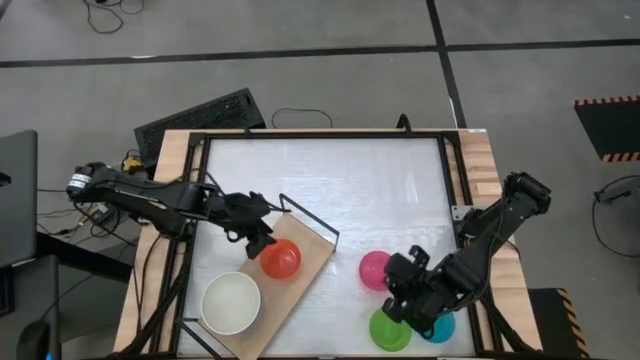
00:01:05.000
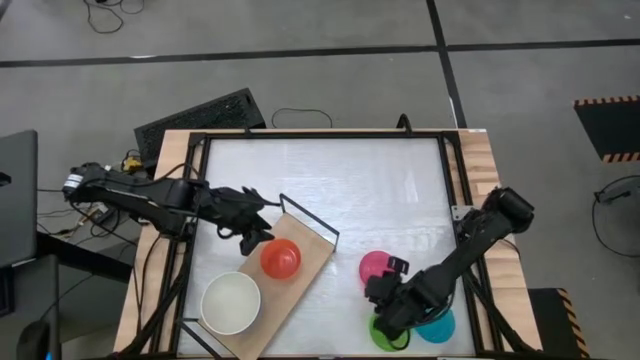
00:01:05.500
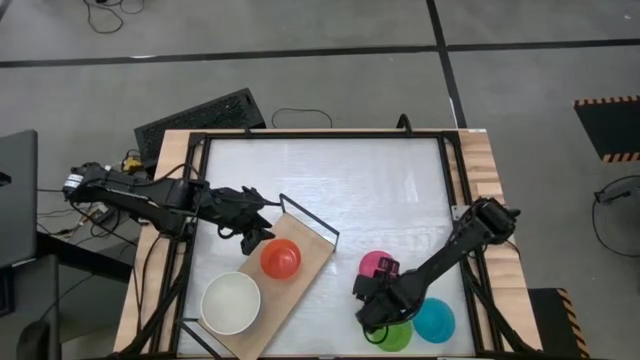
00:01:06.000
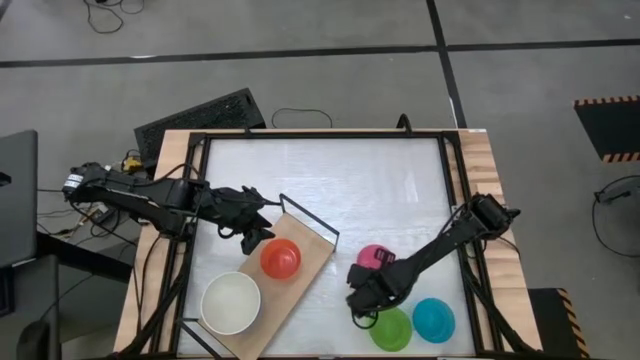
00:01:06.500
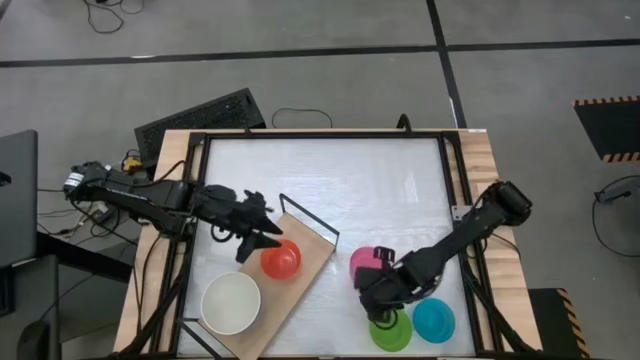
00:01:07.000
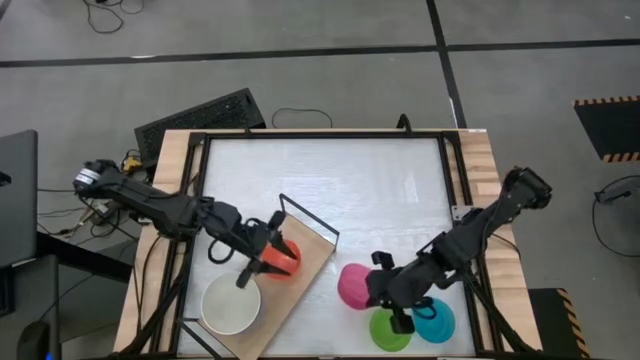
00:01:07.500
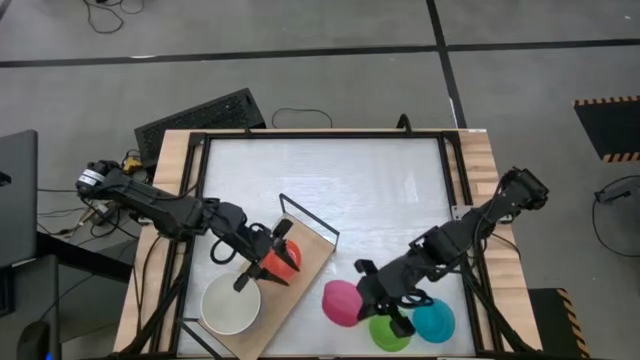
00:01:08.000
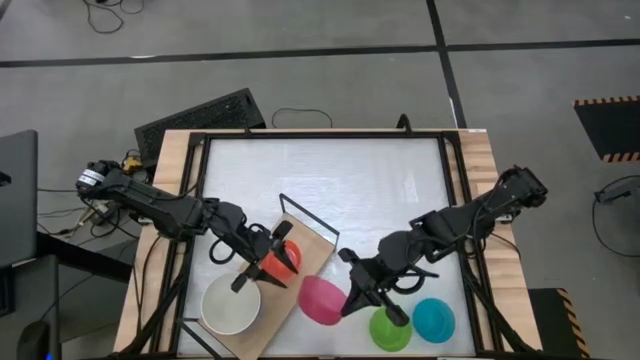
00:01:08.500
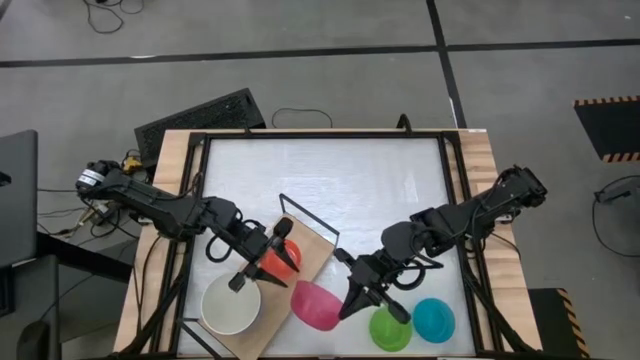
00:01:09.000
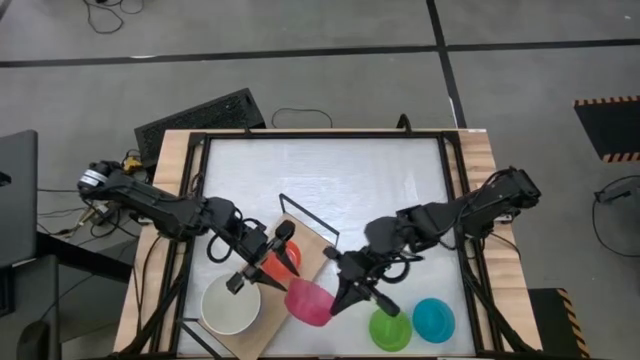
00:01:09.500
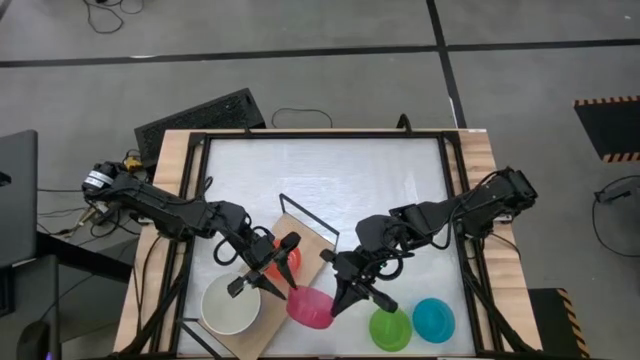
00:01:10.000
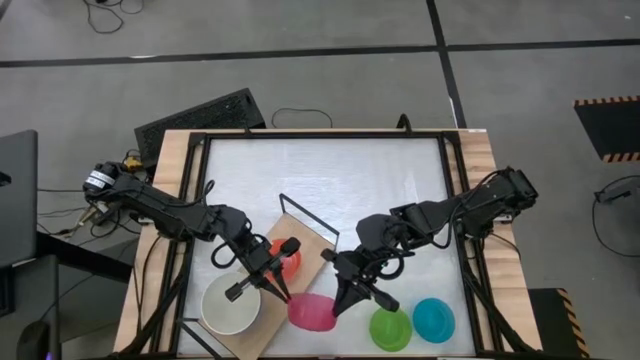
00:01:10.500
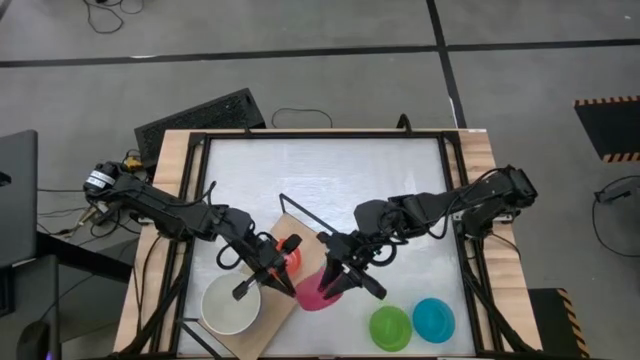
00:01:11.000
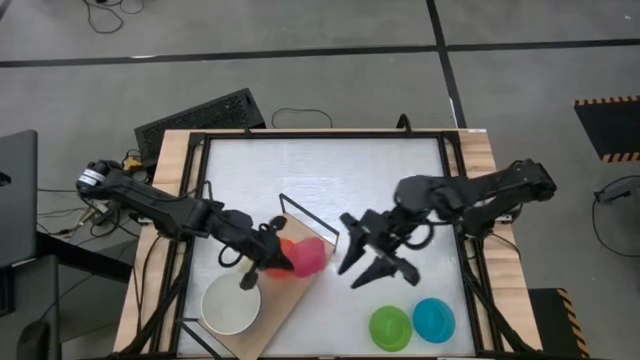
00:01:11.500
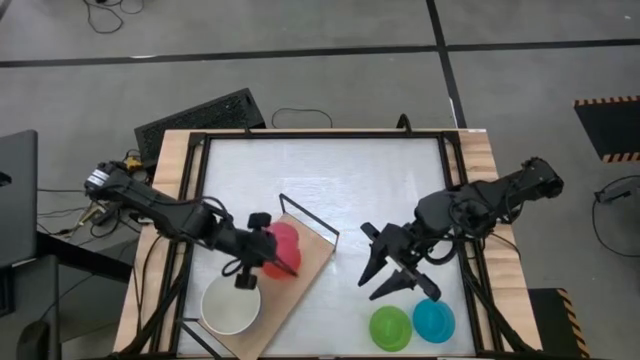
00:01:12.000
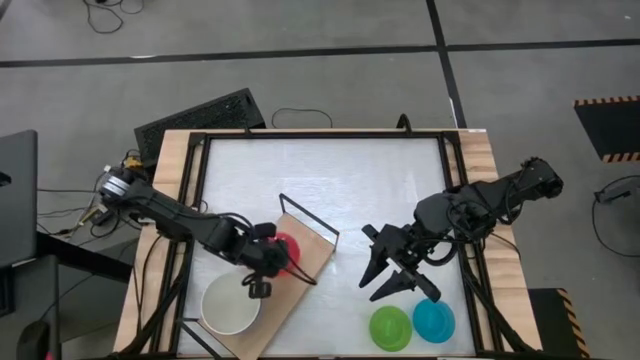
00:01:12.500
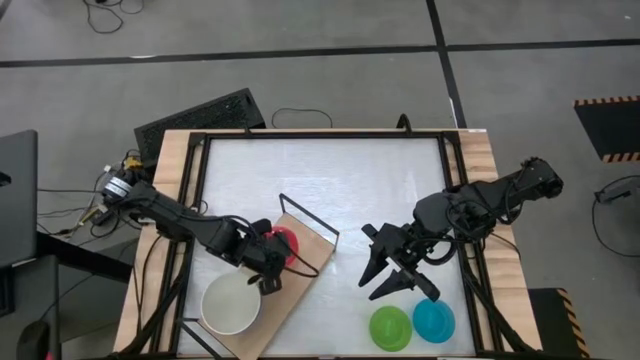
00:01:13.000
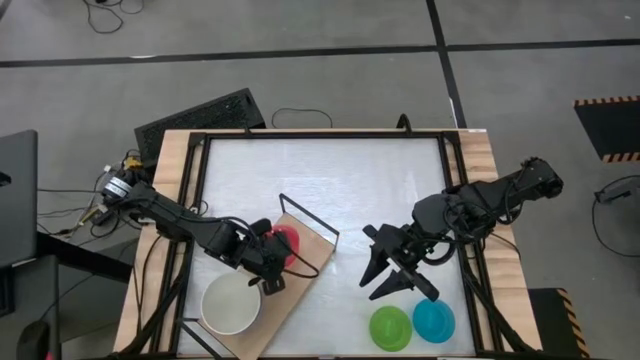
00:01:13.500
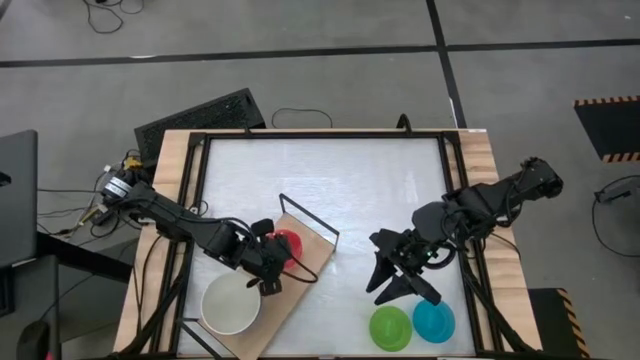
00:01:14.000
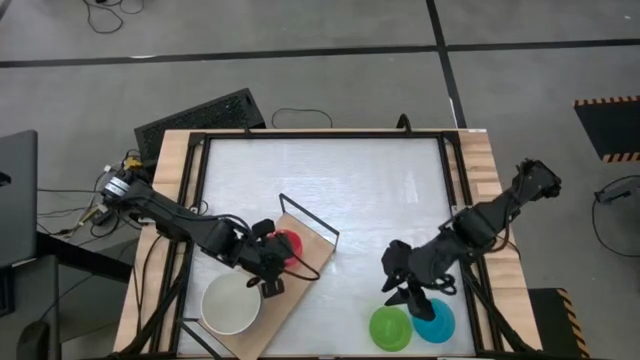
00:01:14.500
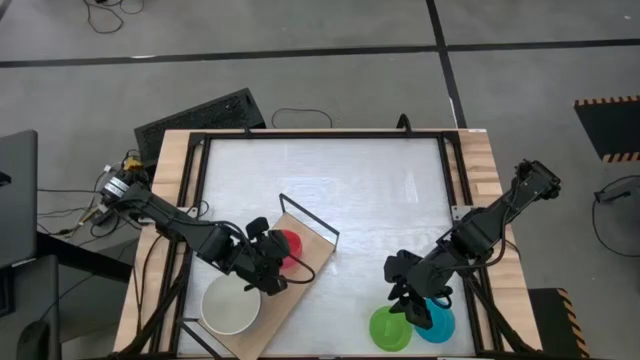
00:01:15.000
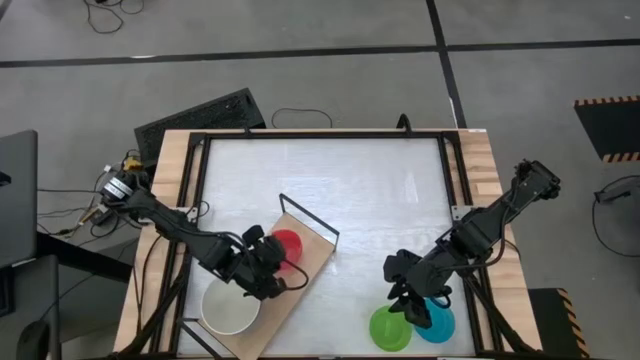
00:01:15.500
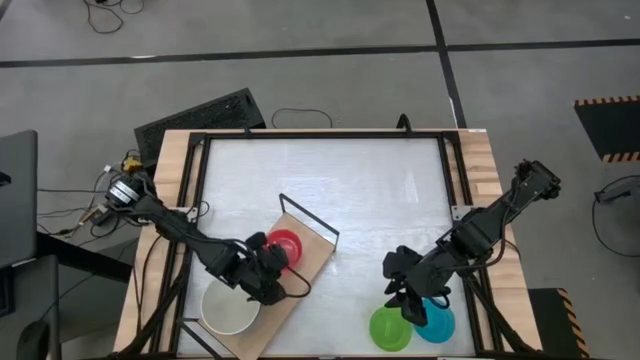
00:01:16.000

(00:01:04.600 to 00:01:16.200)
Task: Place and stack bowls onto a shelf
Stack the small pink bowl on the small orange bowl on the shelf

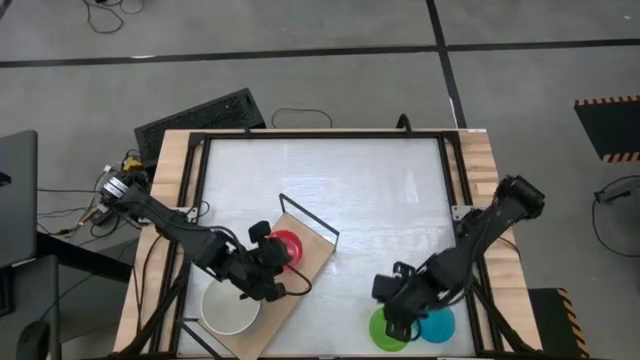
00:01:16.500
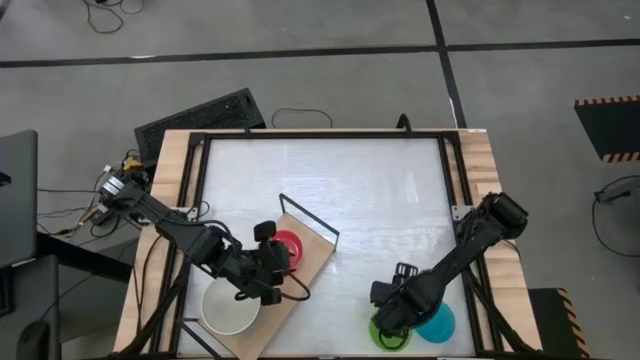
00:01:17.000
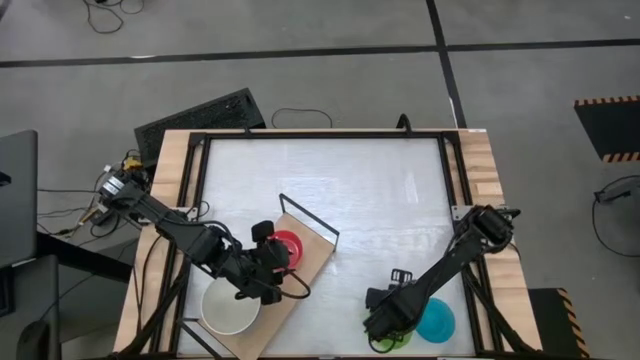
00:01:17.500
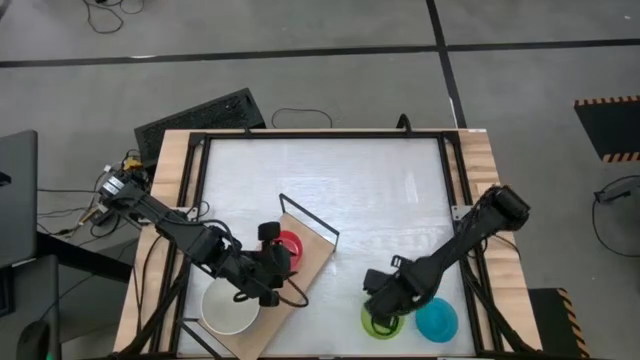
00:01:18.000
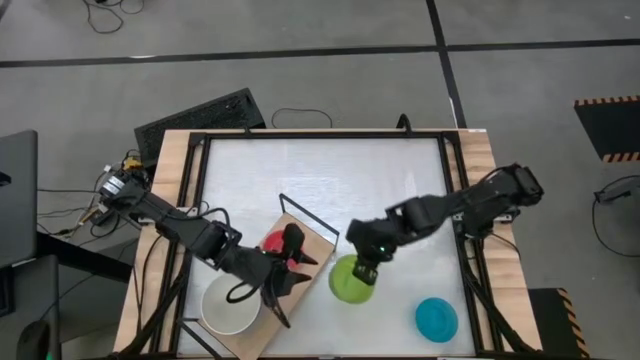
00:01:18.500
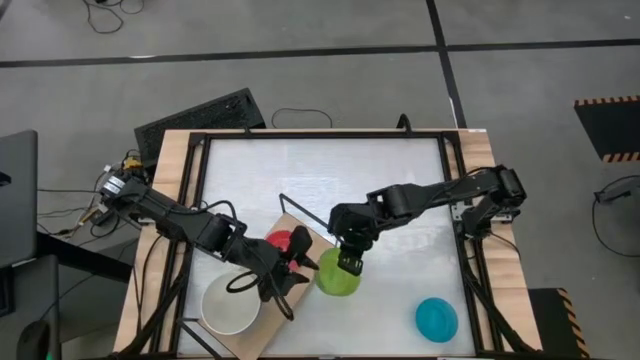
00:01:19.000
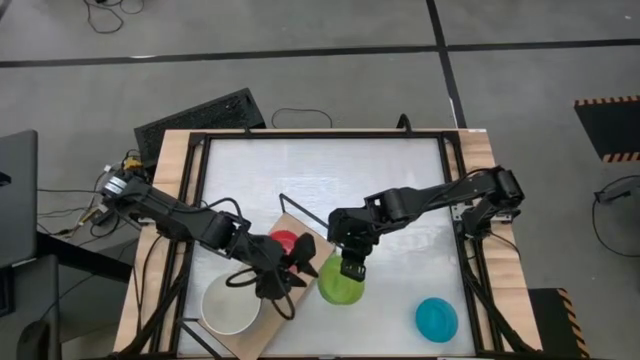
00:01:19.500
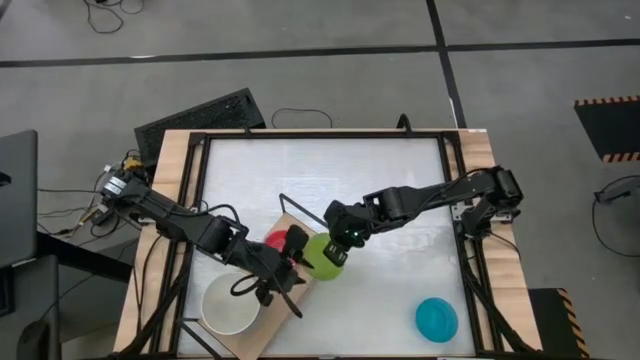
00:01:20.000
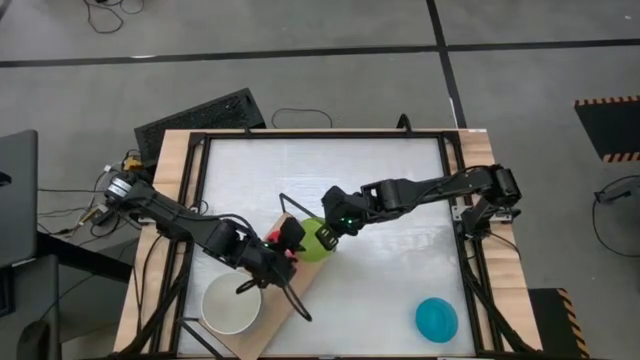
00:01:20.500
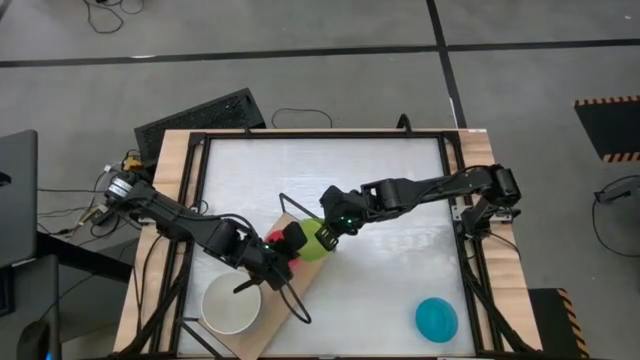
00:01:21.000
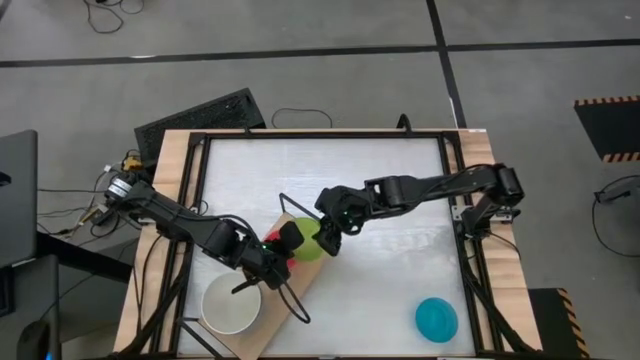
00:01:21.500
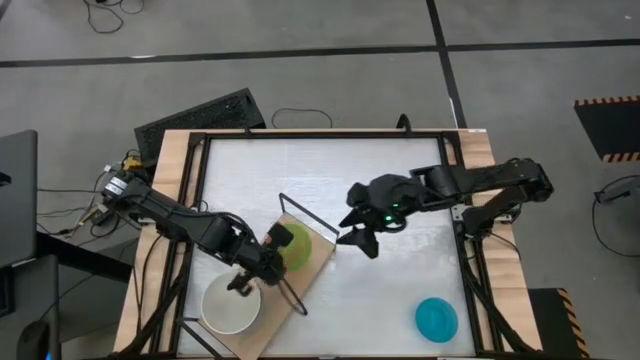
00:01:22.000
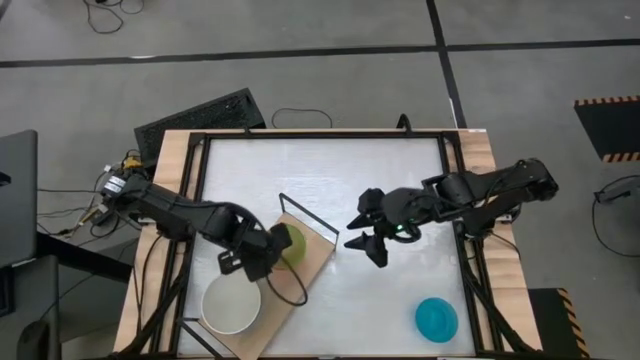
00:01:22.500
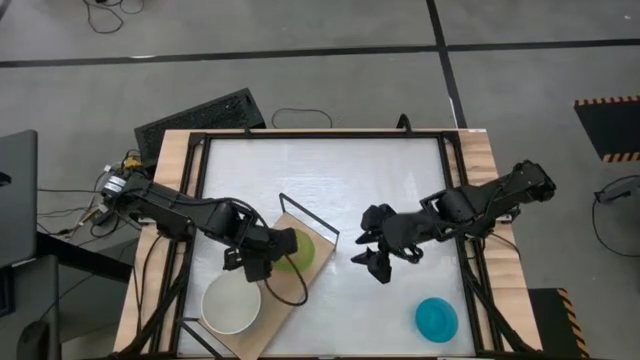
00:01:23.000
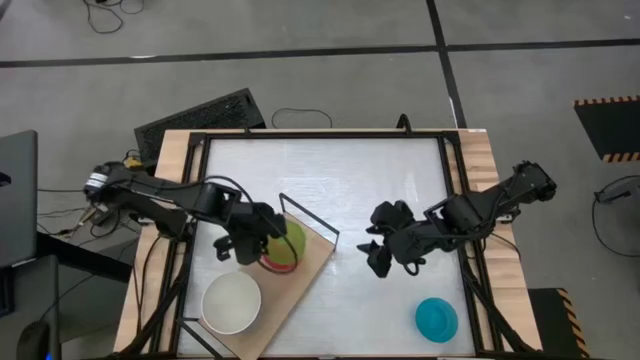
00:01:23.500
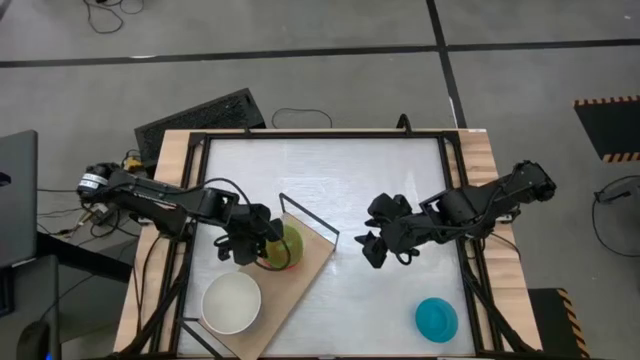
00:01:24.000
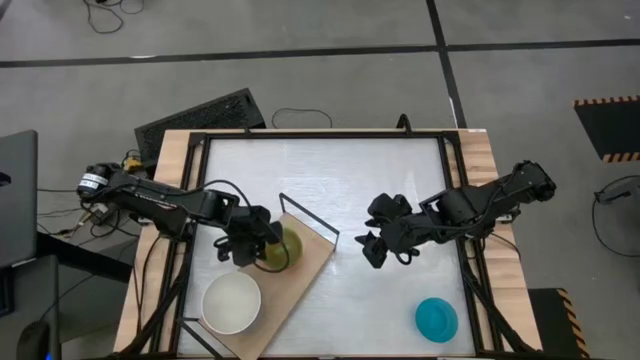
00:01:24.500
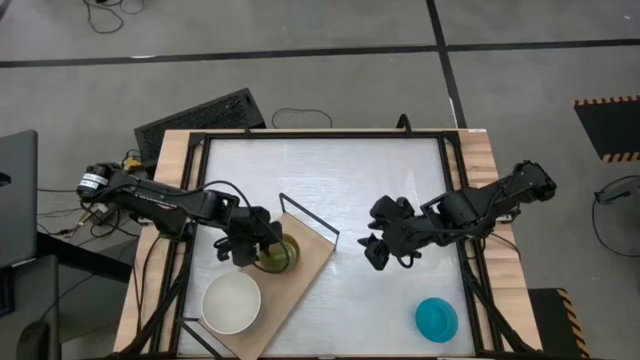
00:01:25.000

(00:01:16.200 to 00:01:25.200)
Stack the small green bowl on the small pink bowl on the shelf
